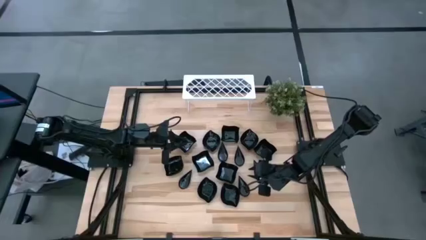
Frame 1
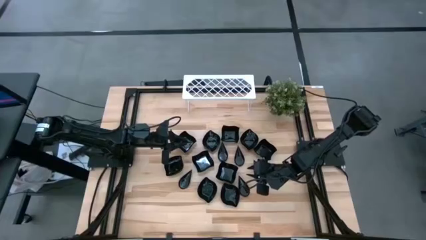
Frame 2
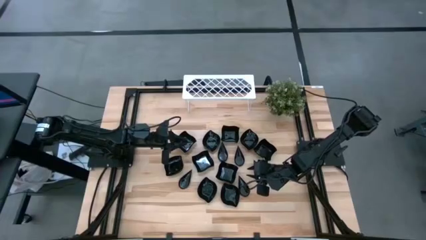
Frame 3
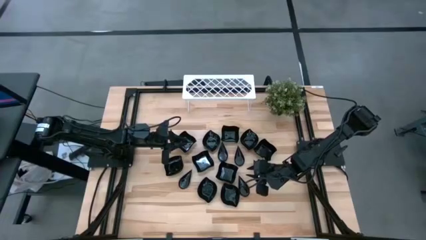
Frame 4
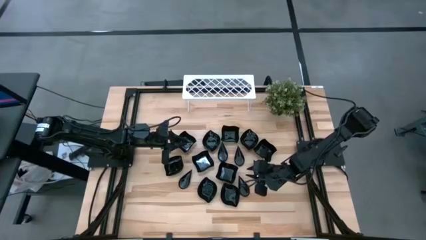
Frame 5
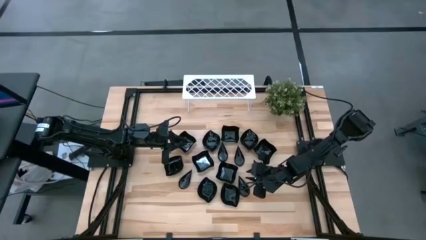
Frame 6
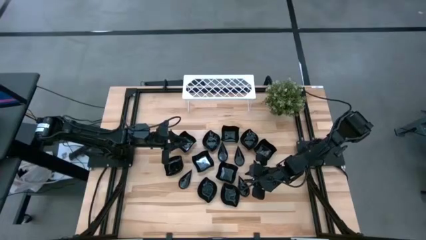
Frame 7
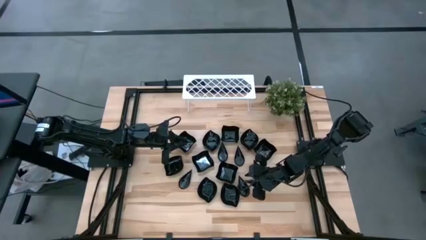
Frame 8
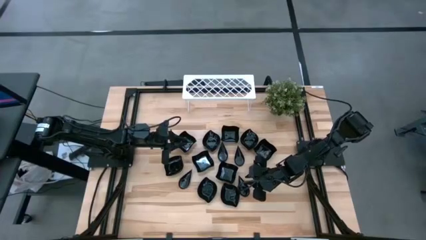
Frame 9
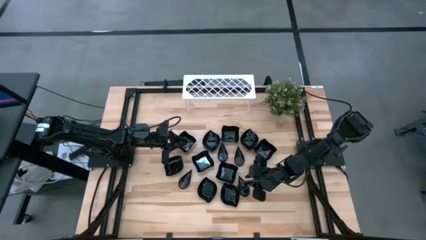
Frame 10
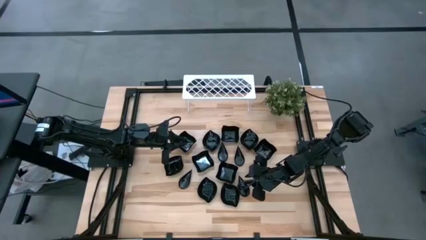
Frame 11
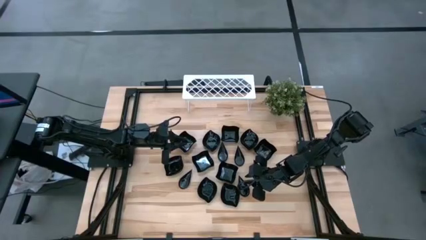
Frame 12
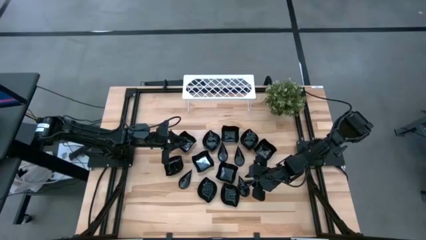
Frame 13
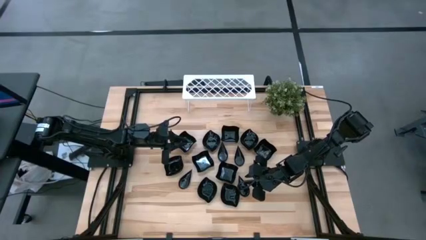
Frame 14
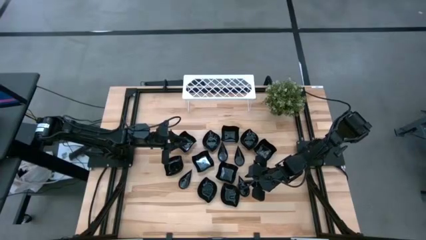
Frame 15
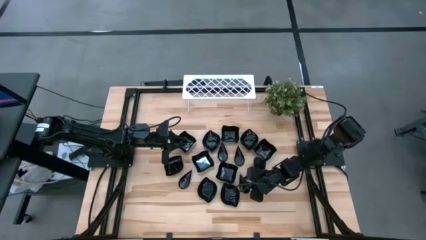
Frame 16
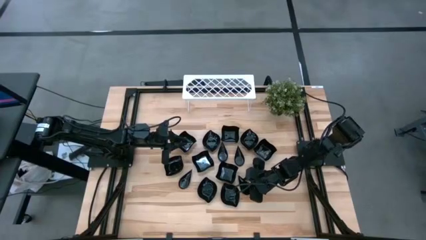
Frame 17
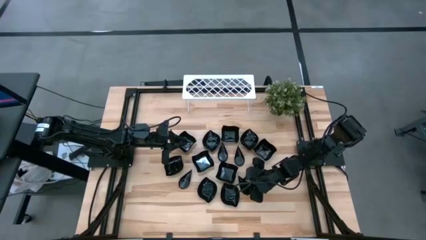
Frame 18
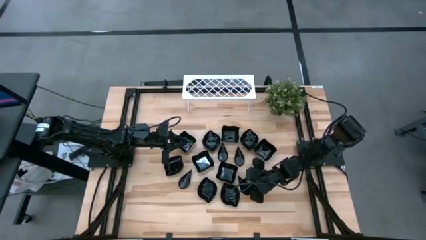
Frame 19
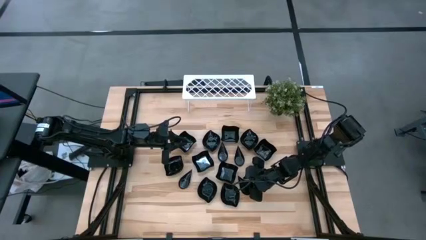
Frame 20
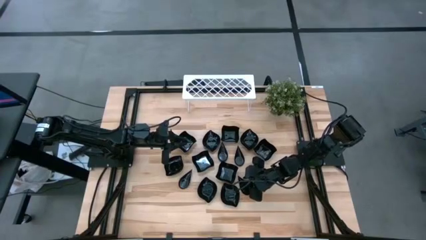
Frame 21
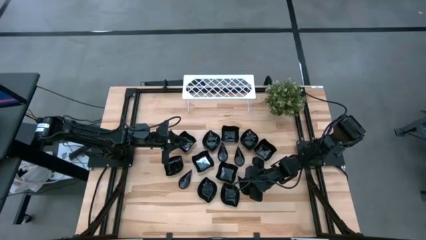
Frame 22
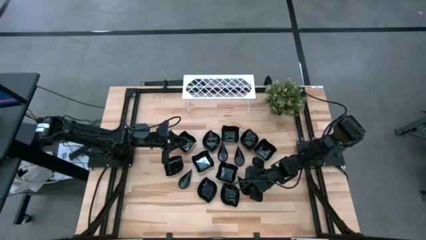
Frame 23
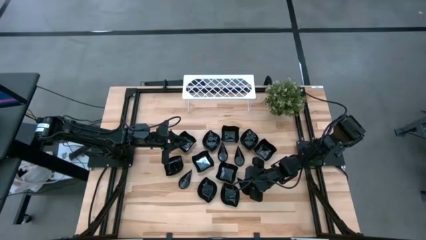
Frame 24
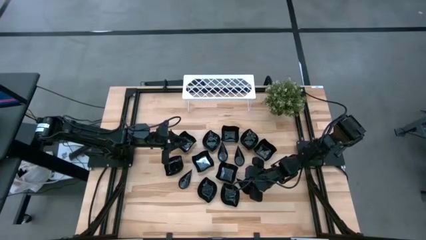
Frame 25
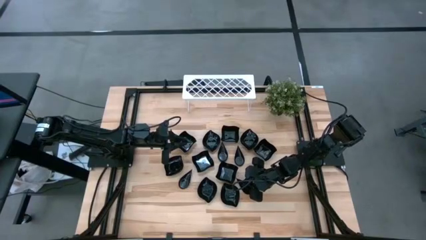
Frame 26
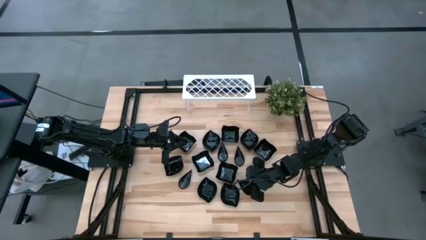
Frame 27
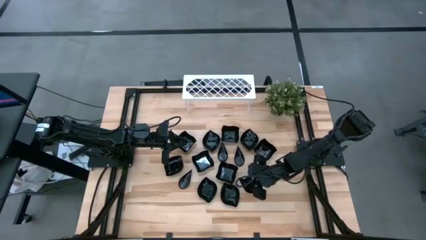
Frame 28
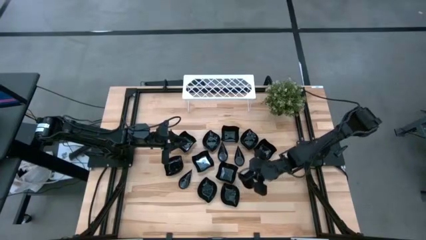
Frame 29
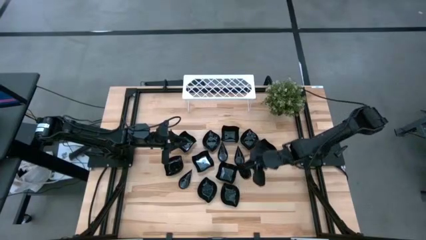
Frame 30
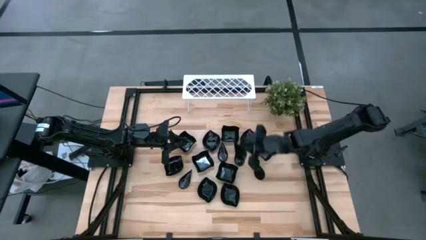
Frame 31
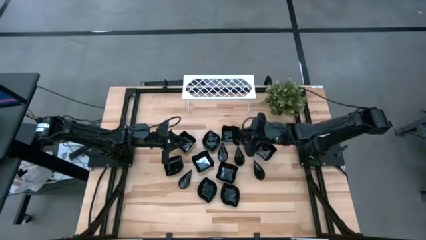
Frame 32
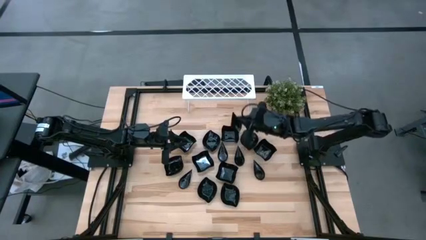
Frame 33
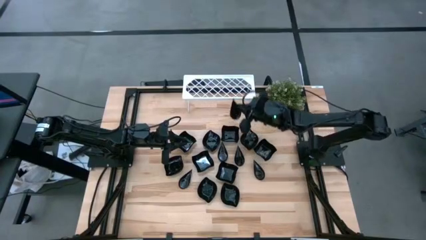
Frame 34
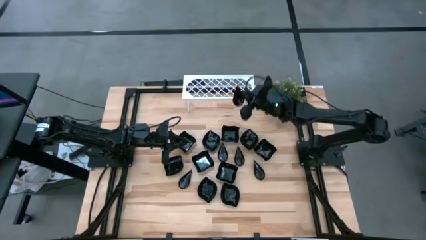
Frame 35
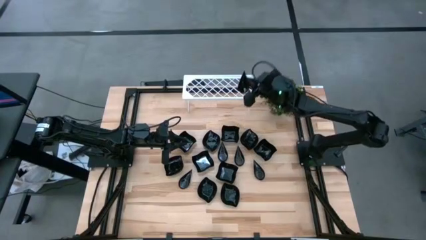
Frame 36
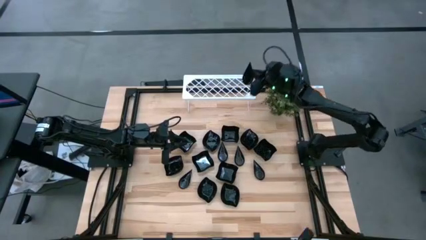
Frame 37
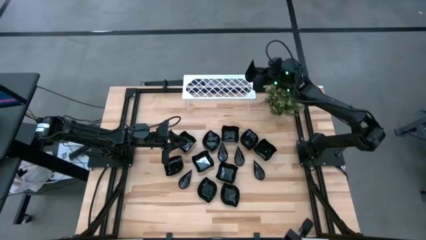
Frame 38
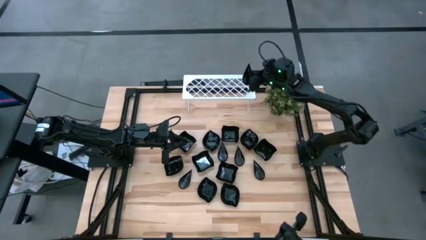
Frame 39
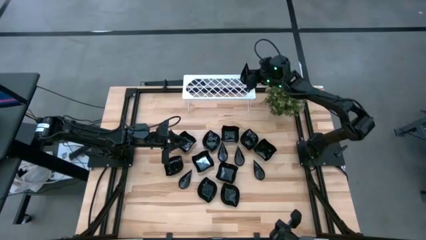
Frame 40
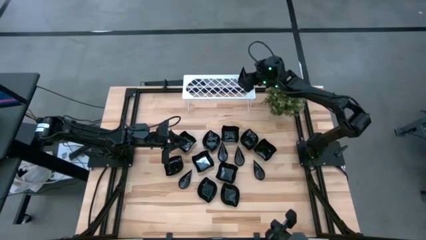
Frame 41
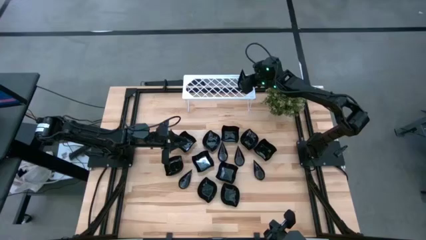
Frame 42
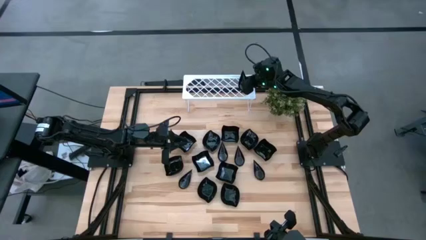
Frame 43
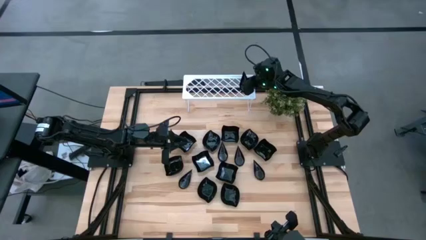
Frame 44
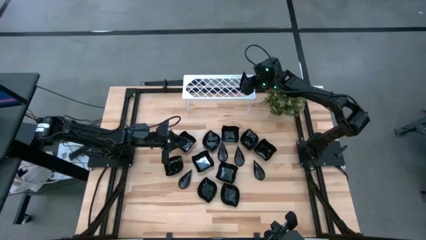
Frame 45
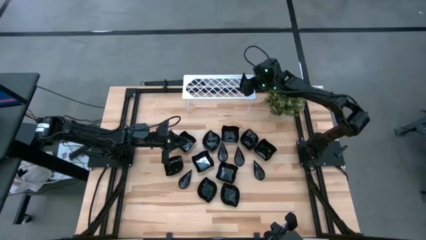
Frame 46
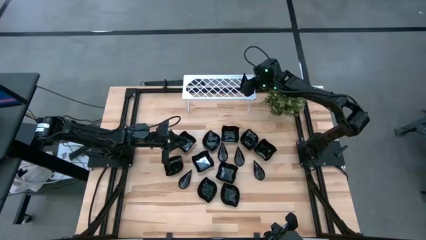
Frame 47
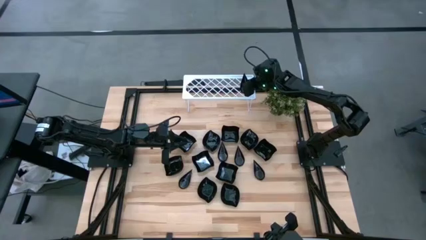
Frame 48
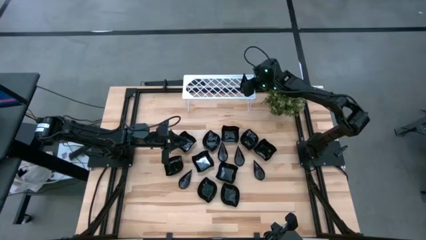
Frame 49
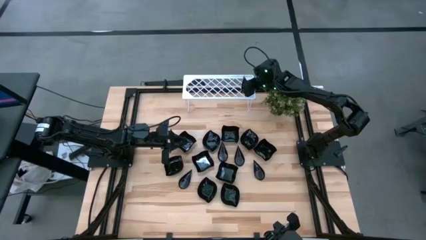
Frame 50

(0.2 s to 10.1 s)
Task: Pick & Place Mini shaped plates
Put the drop shaped plate on the shelf
